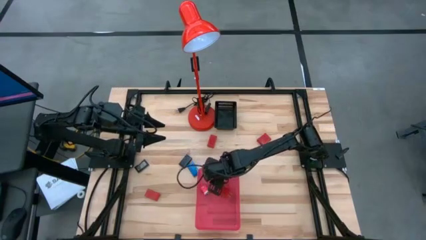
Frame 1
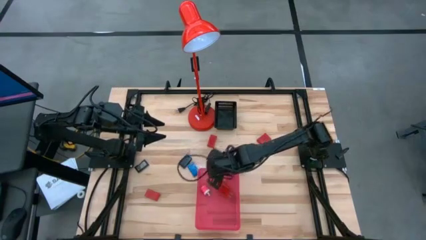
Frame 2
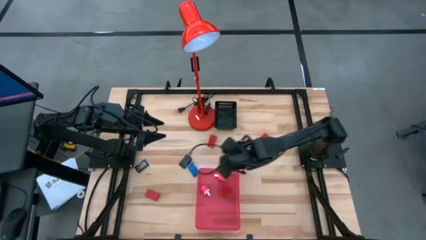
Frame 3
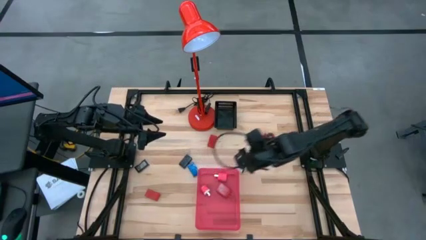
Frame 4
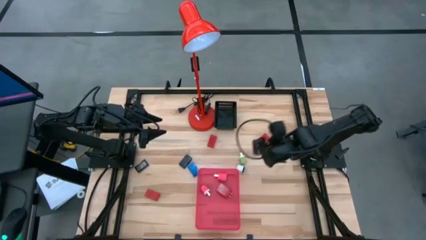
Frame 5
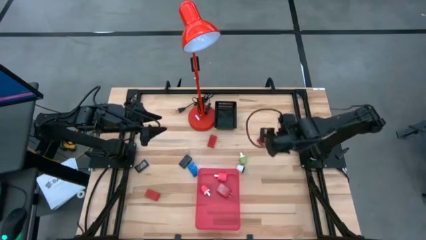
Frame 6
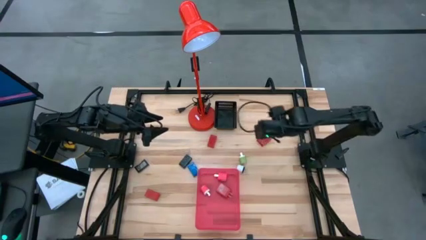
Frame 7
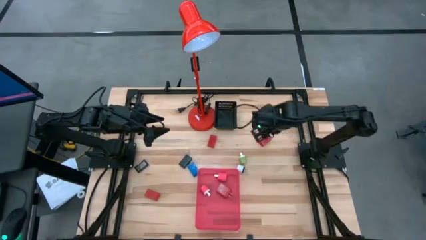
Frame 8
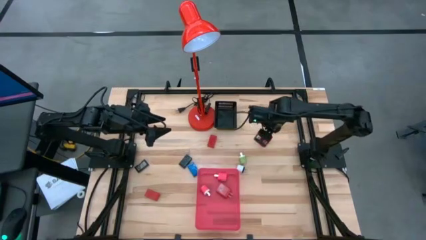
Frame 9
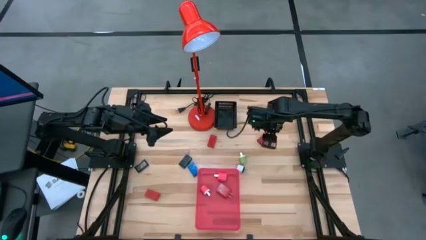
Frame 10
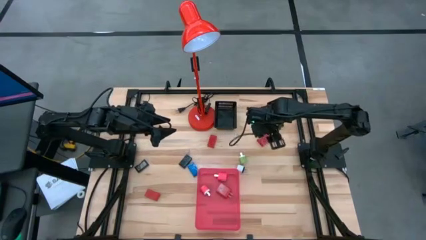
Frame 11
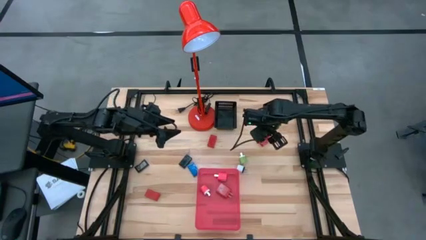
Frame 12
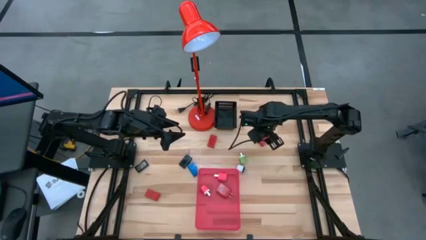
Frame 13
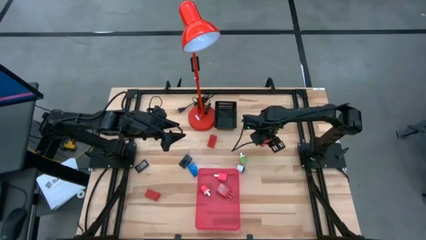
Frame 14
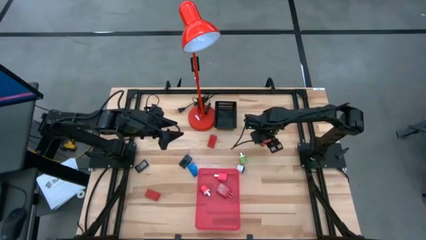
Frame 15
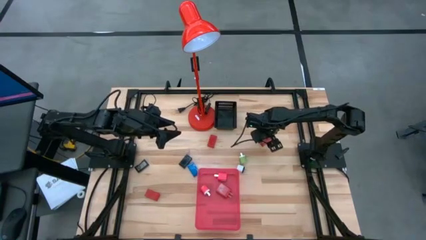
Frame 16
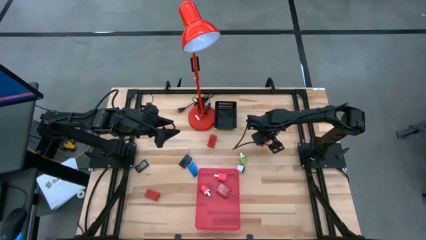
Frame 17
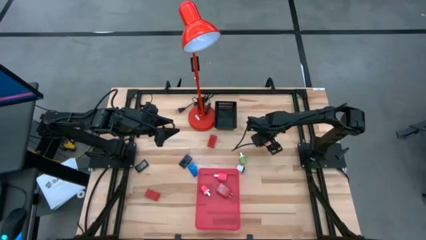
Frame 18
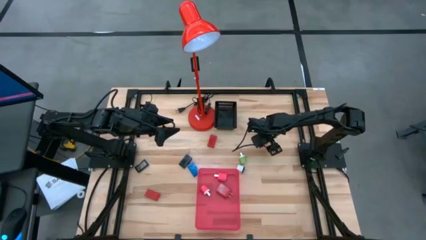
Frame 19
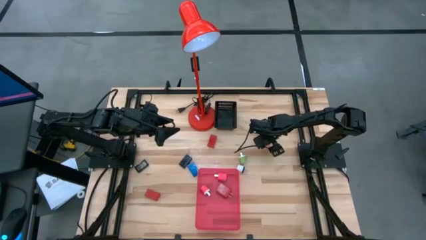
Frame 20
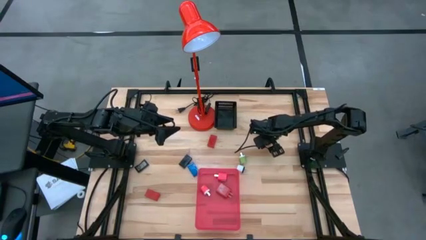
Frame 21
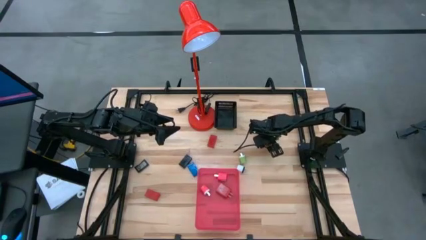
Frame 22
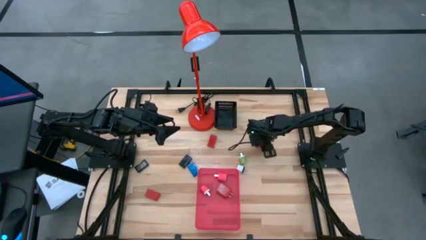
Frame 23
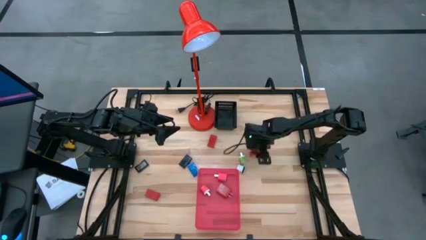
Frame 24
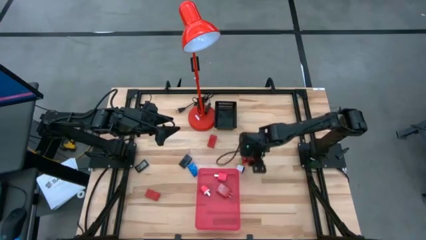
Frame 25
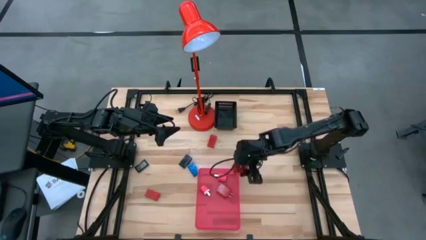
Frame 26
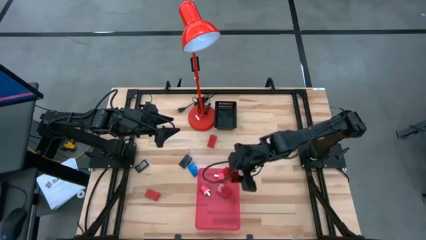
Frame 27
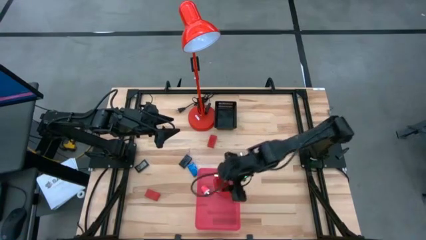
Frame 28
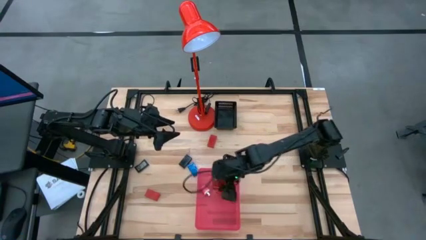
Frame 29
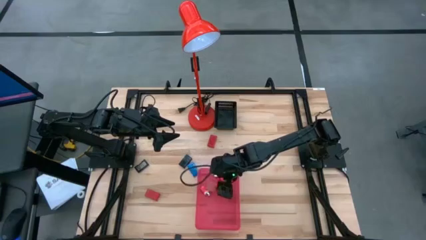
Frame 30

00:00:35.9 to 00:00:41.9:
Task: Pick & Place Office items
Put the red charger adapter into the red bin

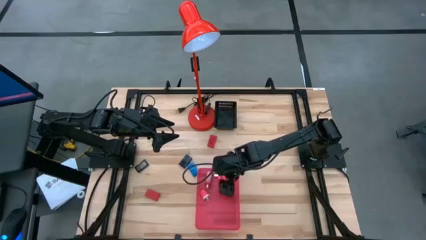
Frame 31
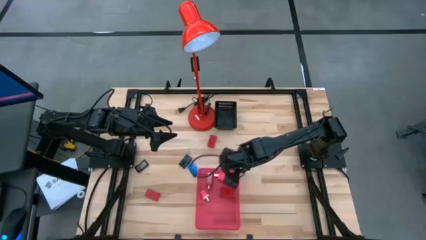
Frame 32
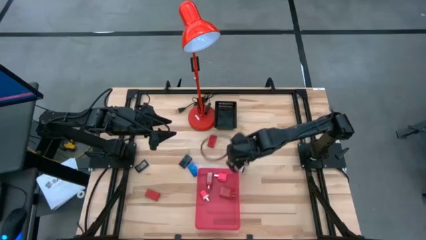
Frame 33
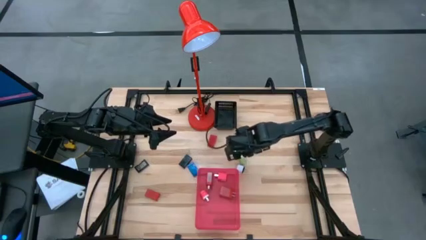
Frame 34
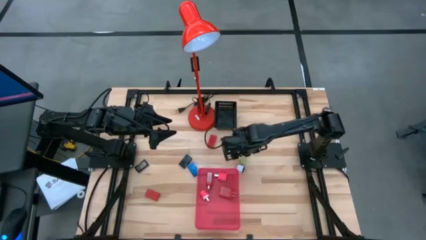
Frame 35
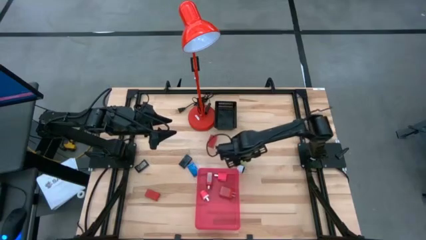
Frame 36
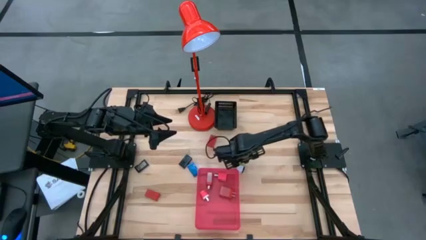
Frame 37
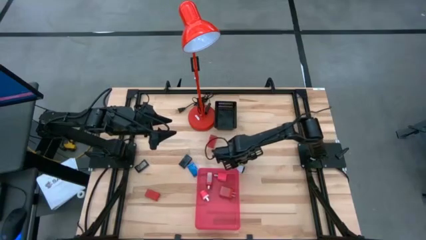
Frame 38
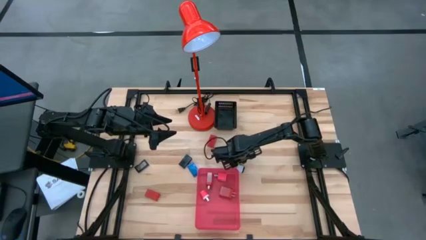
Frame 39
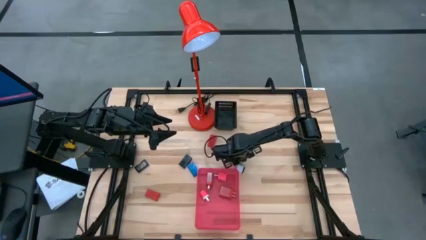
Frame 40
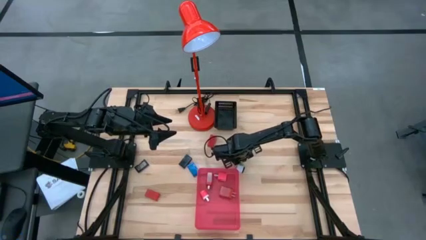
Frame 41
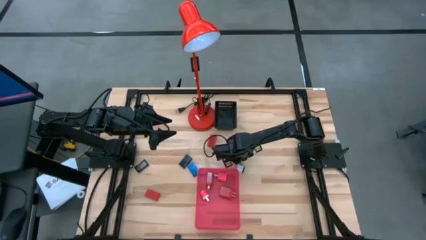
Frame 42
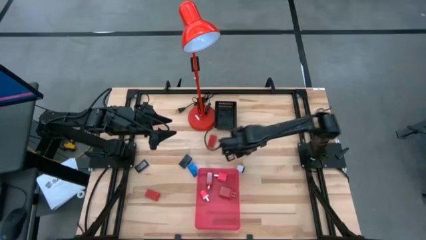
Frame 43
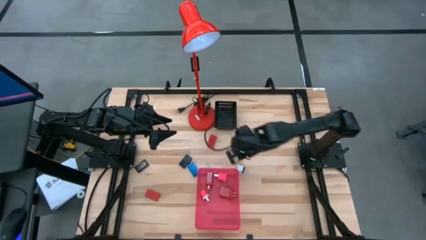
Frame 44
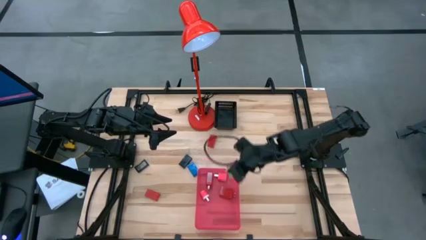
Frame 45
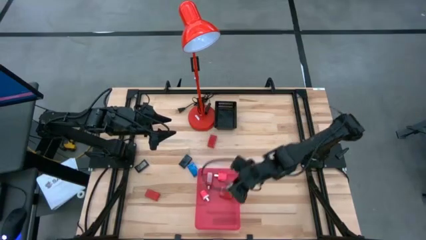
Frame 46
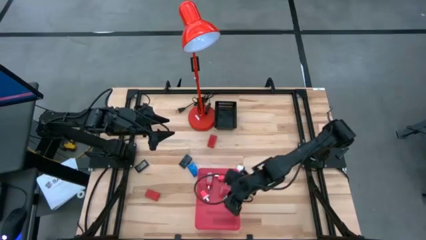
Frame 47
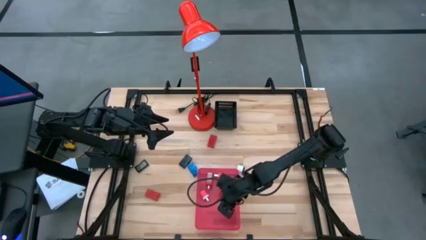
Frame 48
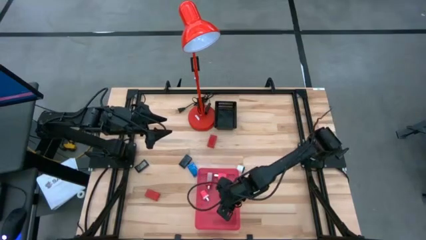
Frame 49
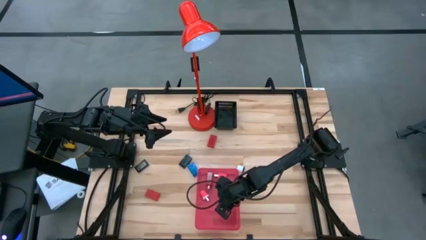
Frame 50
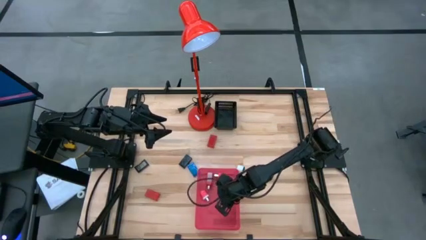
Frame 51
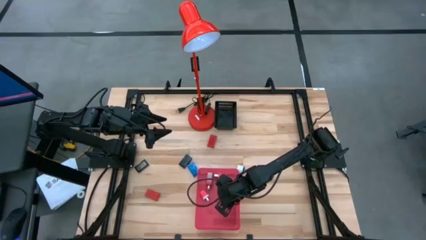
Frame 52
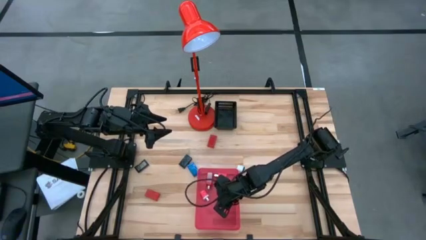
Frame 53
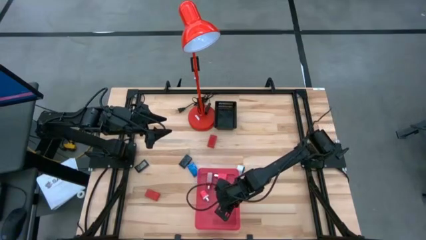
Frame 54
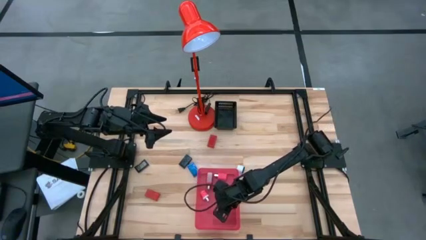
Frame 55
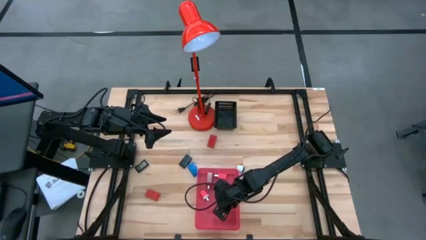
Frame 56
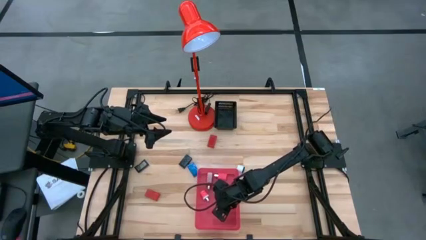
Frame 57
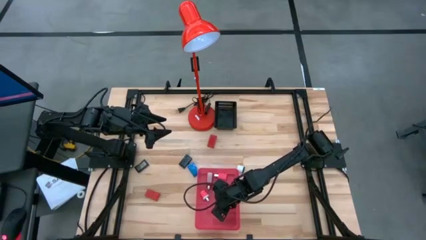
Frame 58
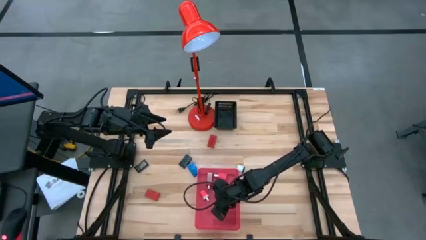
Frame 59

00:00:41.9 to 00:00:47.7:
Put the green charger adapter into the red bin

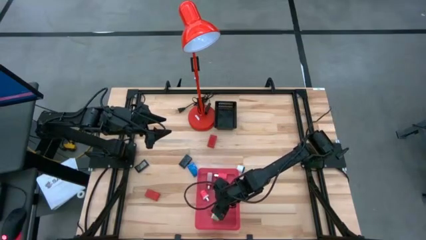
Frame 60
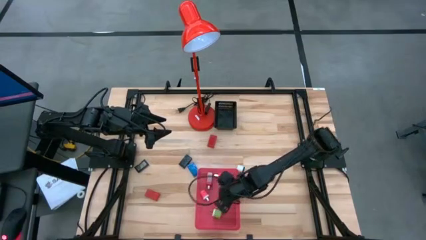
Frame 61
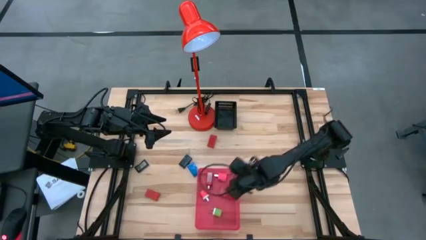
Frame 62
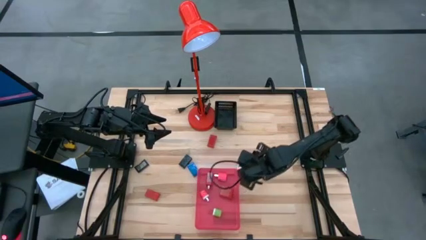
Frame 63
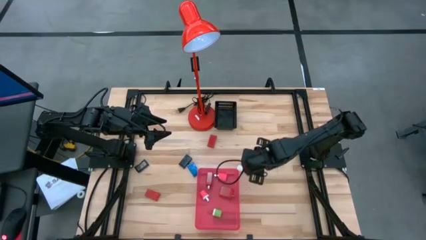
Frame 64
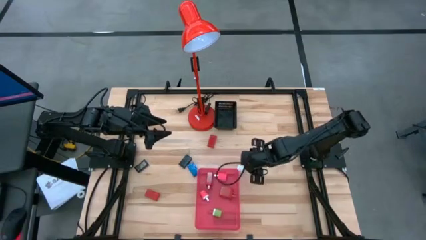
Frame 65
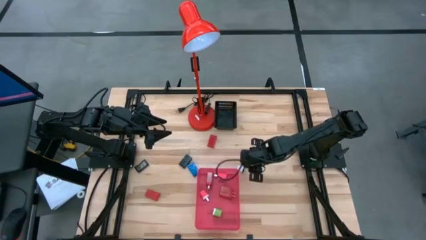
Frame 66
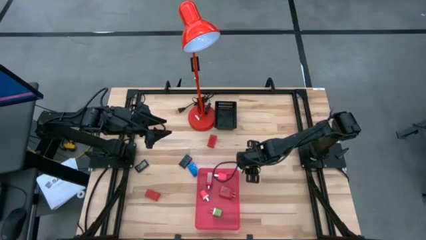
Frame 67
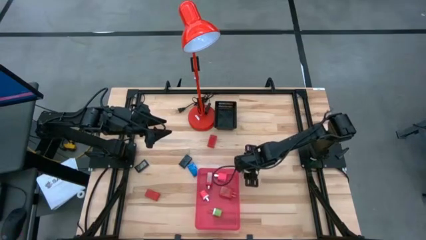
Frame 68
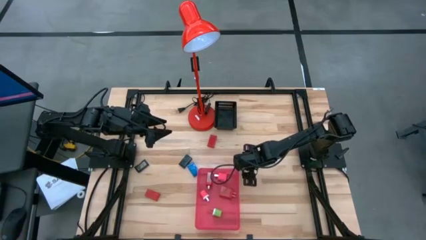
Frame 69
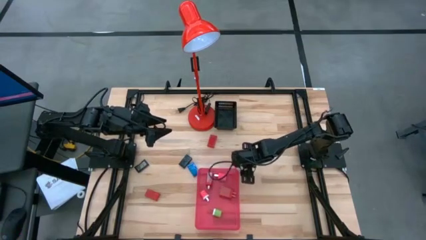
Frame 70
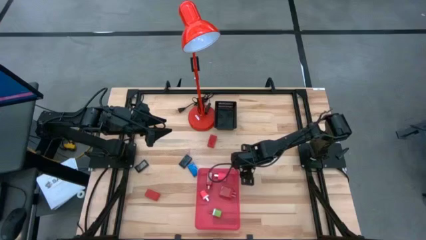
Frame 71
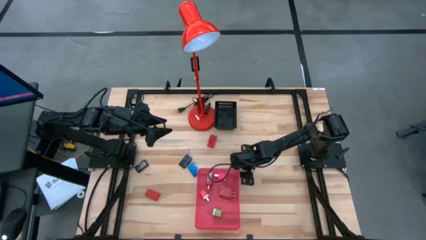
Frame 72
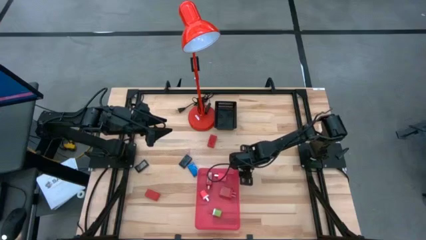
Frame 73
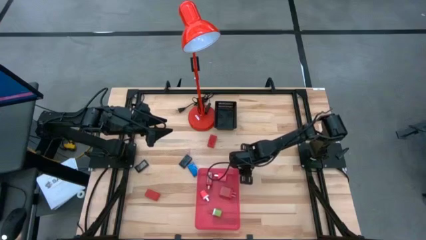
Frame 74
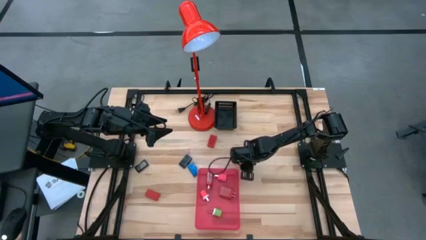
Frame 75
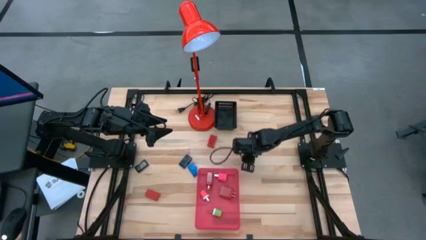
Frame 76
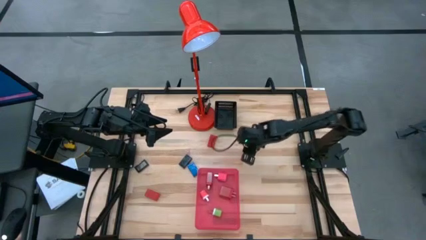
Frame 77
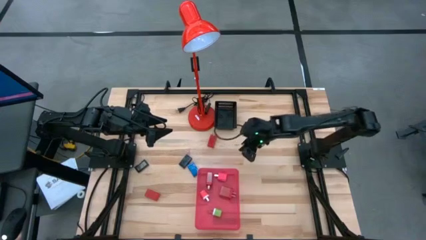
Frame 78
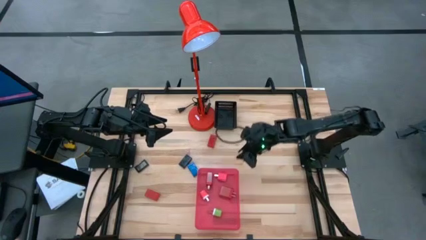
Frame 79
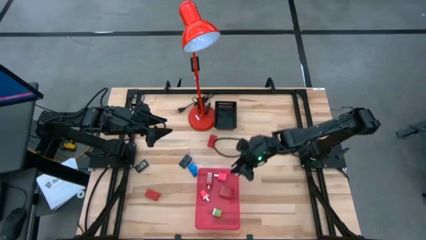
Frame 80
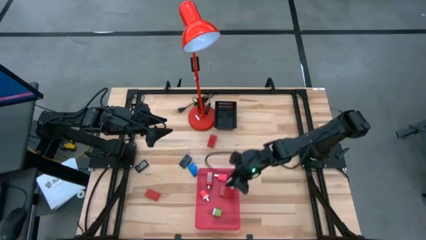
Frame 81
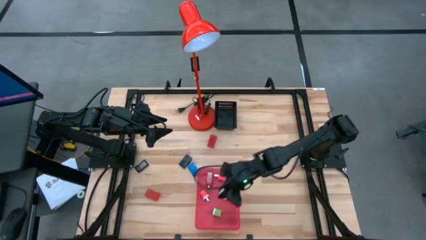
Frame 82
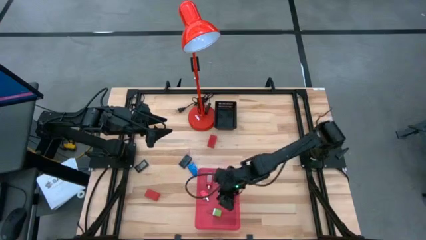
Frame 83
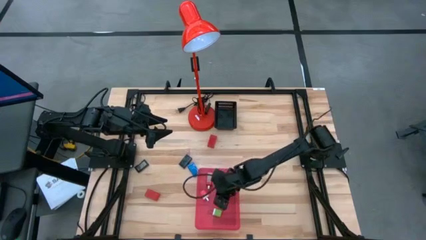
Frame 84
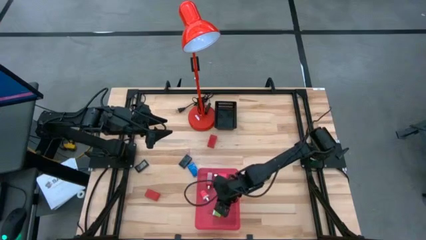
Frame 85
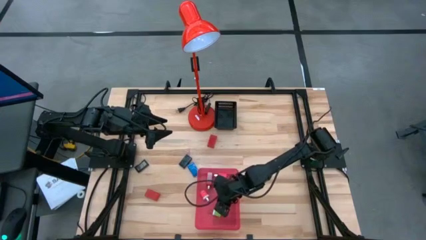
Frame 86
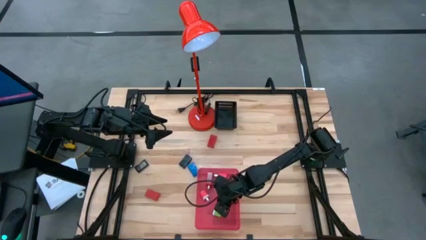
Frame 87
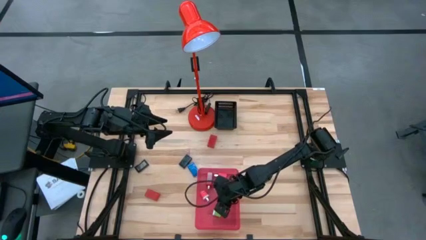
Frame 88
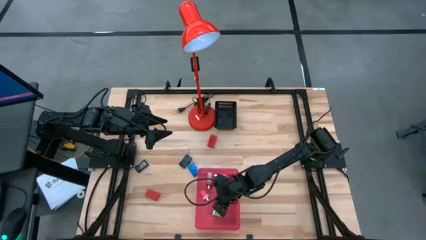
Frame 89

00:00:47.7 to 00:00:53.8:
Put the white charger adapter into the red bin
